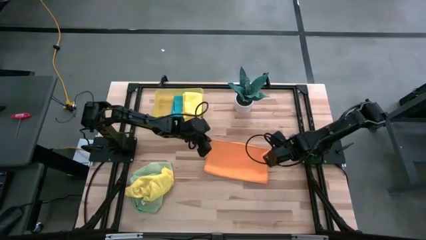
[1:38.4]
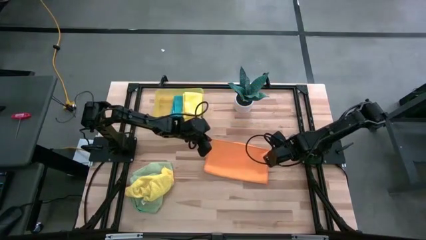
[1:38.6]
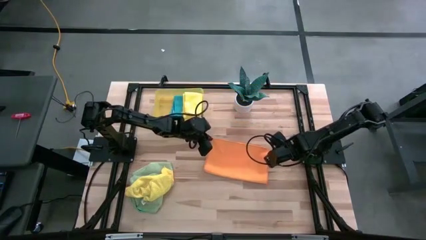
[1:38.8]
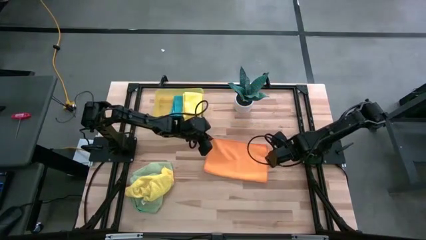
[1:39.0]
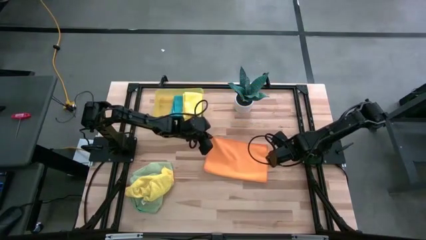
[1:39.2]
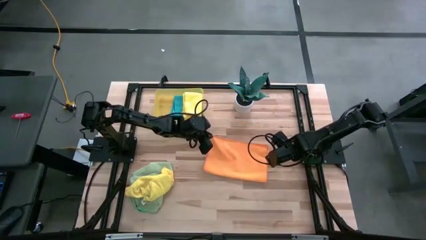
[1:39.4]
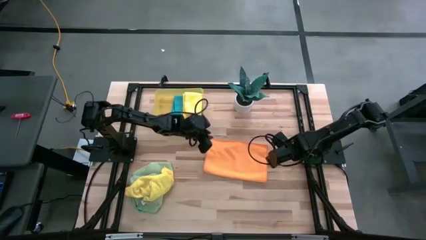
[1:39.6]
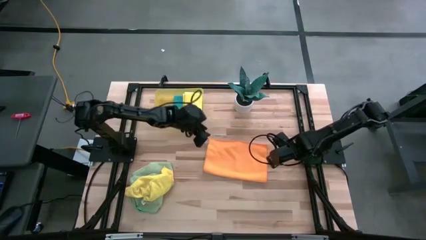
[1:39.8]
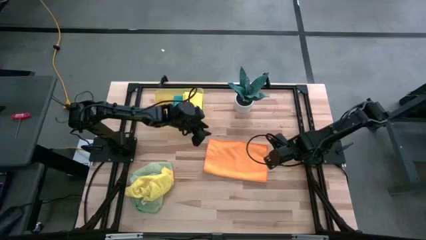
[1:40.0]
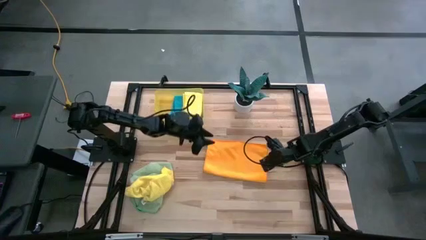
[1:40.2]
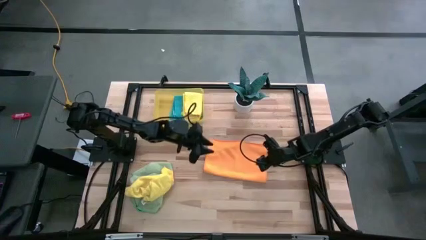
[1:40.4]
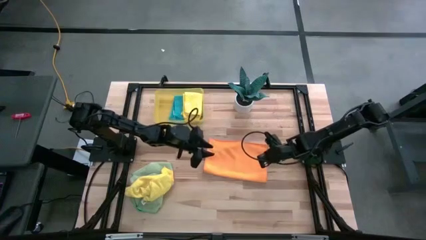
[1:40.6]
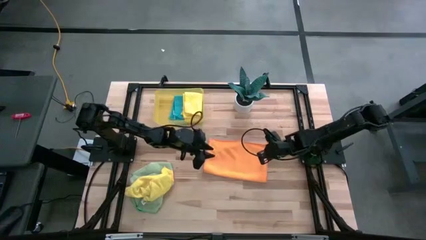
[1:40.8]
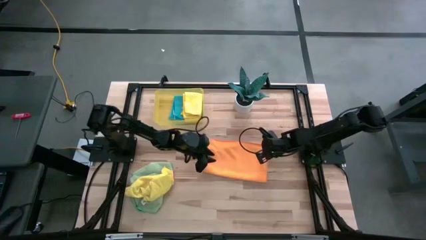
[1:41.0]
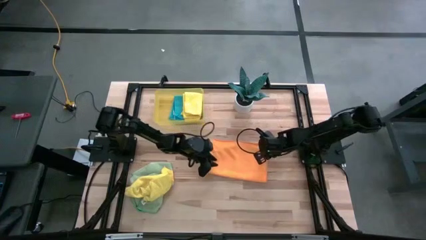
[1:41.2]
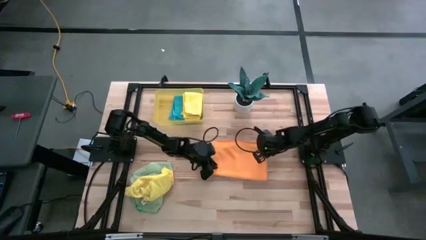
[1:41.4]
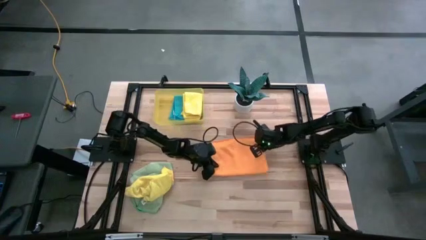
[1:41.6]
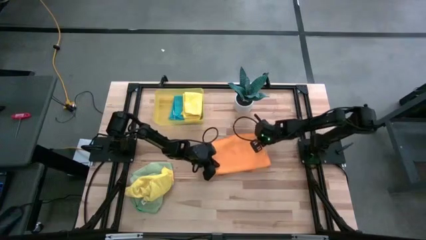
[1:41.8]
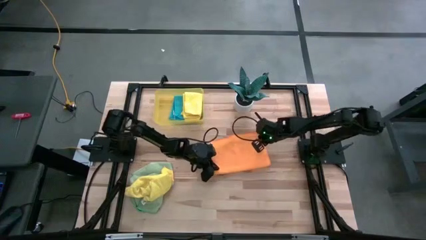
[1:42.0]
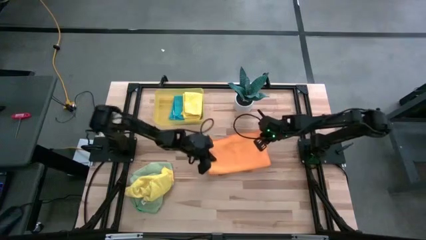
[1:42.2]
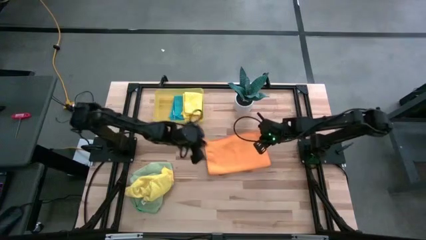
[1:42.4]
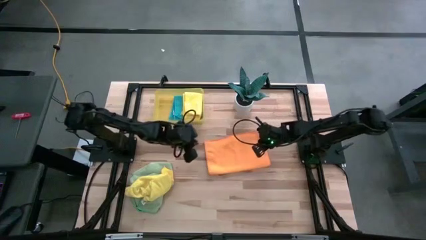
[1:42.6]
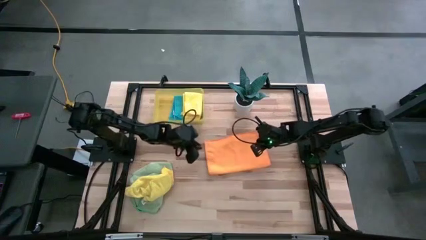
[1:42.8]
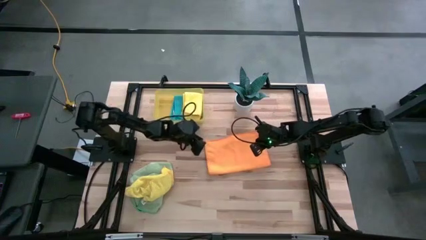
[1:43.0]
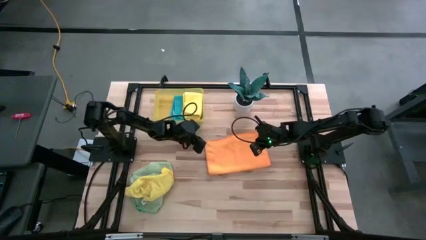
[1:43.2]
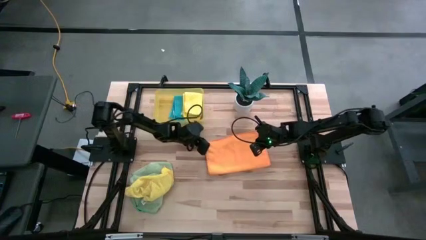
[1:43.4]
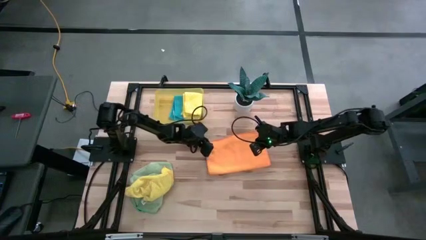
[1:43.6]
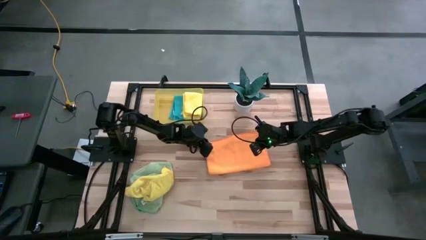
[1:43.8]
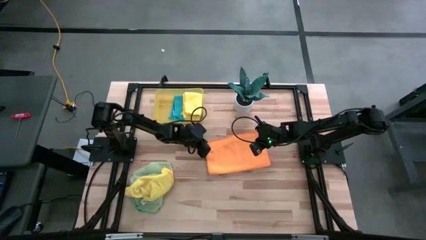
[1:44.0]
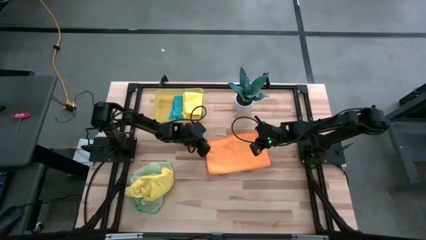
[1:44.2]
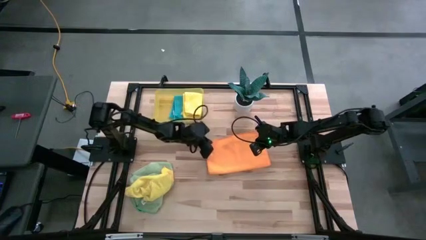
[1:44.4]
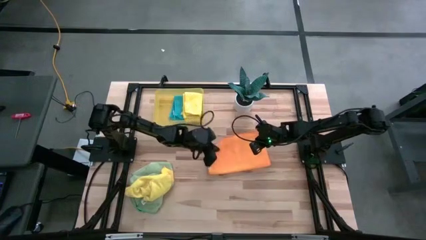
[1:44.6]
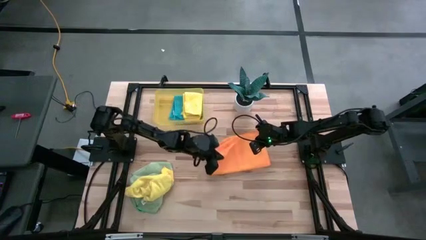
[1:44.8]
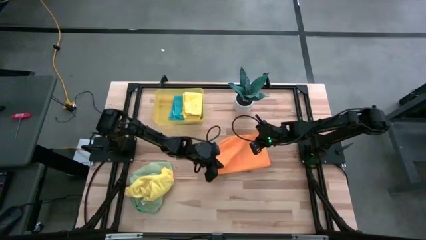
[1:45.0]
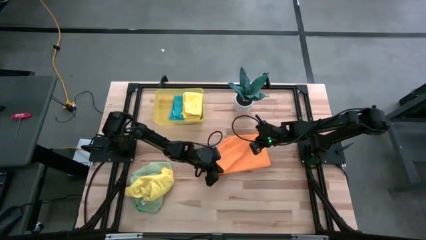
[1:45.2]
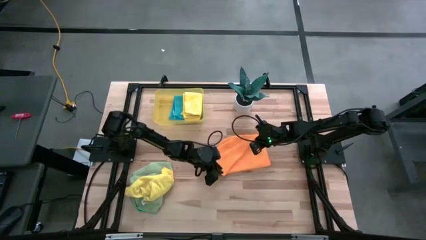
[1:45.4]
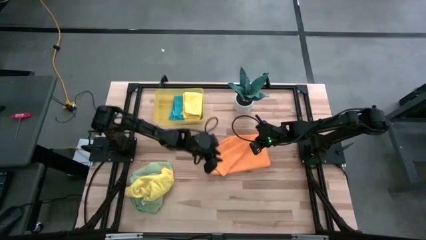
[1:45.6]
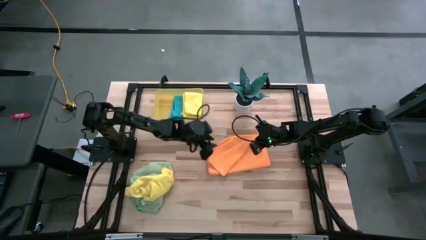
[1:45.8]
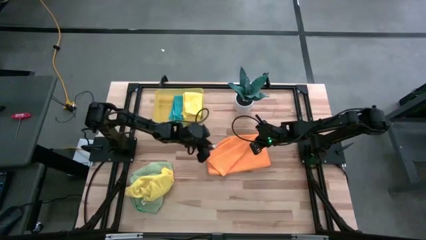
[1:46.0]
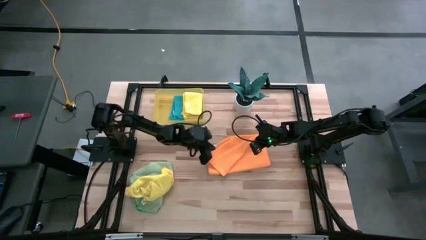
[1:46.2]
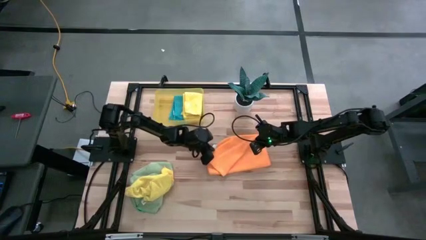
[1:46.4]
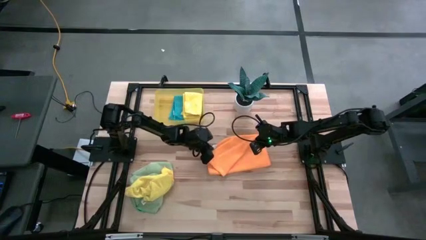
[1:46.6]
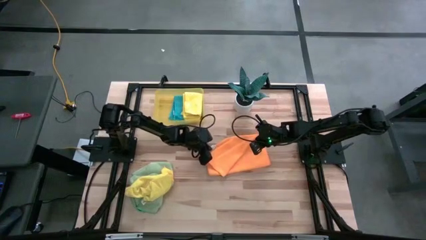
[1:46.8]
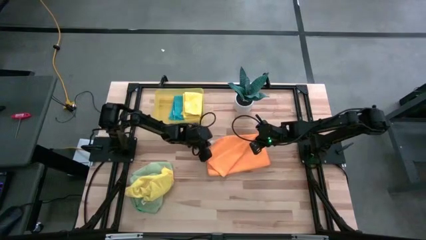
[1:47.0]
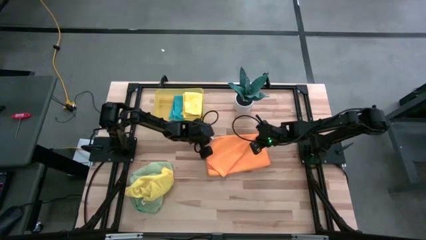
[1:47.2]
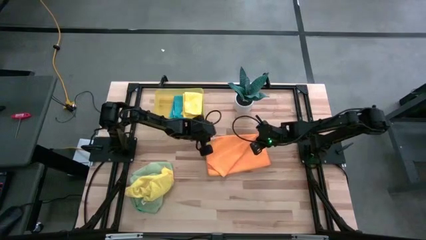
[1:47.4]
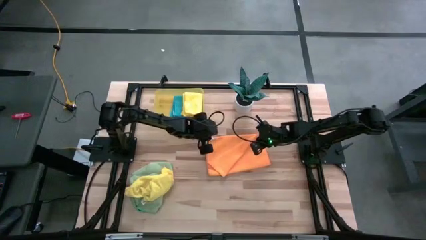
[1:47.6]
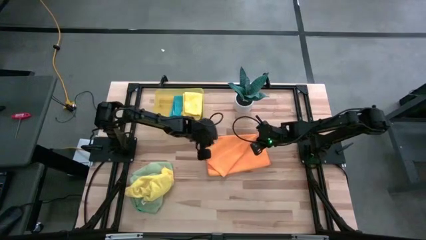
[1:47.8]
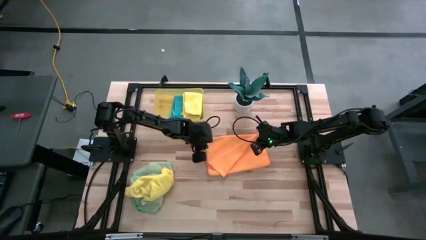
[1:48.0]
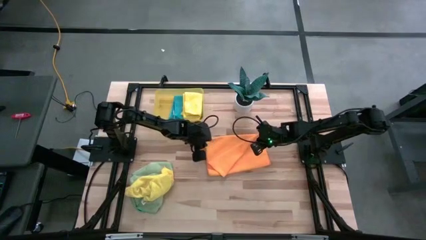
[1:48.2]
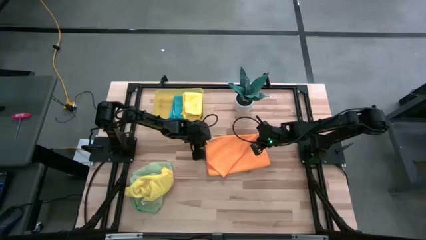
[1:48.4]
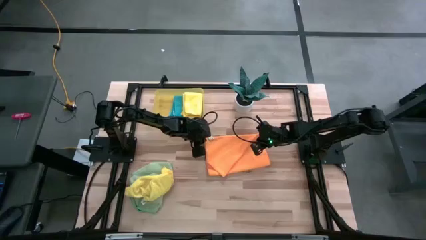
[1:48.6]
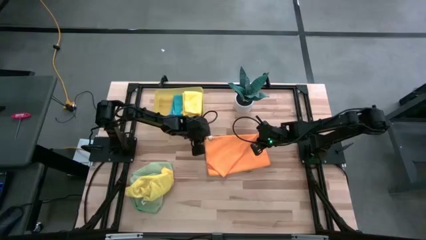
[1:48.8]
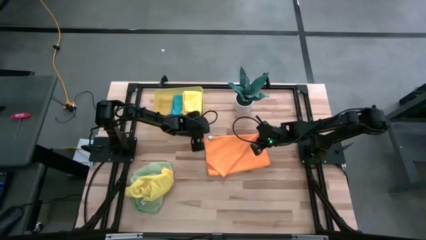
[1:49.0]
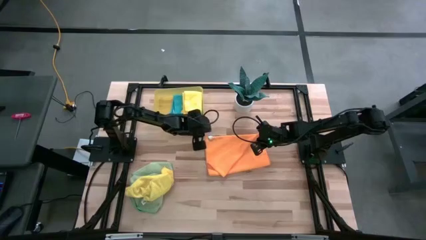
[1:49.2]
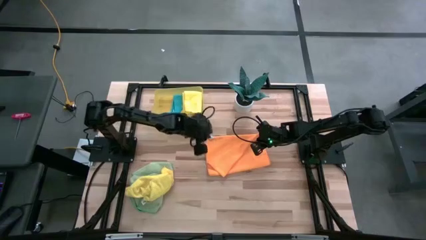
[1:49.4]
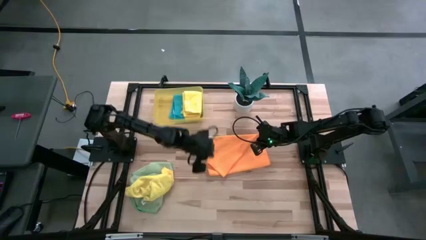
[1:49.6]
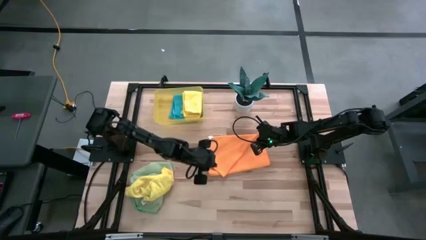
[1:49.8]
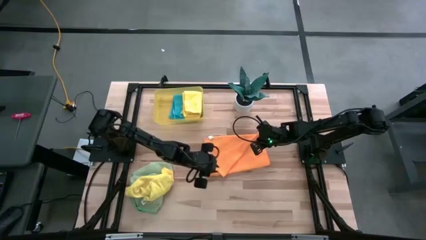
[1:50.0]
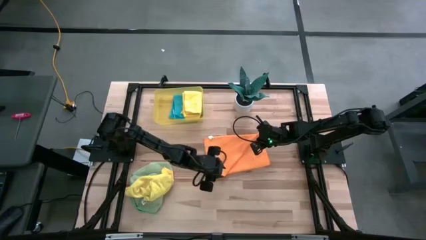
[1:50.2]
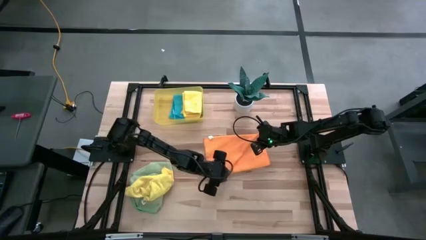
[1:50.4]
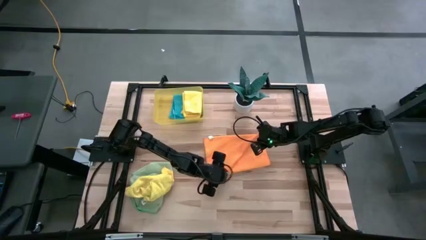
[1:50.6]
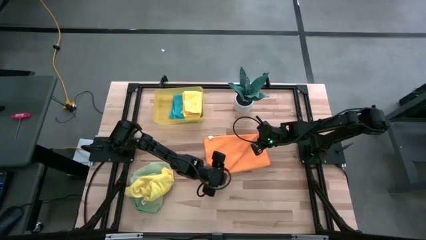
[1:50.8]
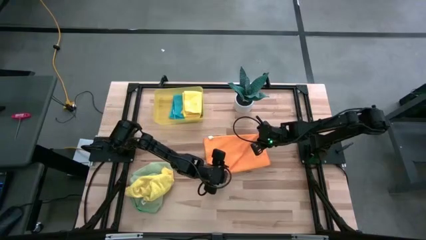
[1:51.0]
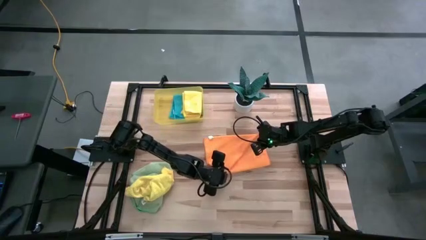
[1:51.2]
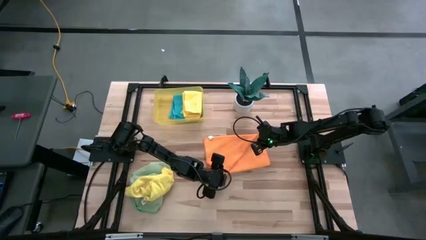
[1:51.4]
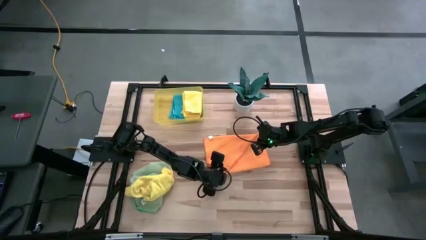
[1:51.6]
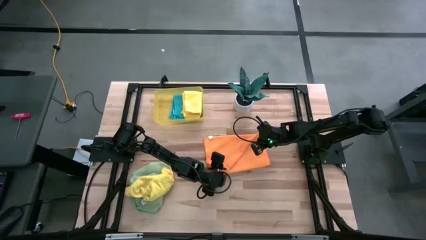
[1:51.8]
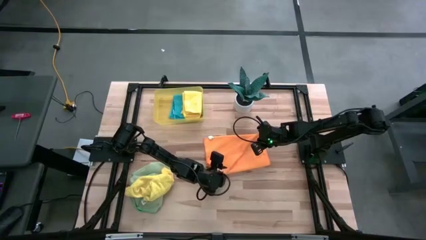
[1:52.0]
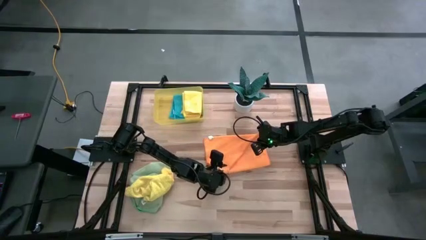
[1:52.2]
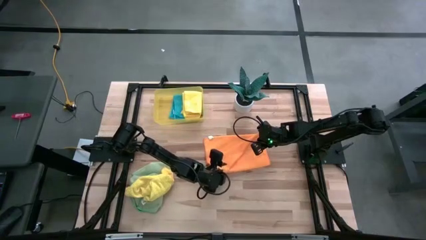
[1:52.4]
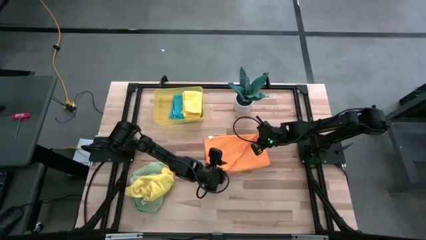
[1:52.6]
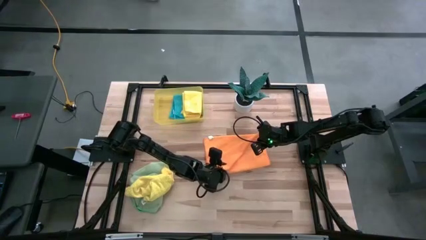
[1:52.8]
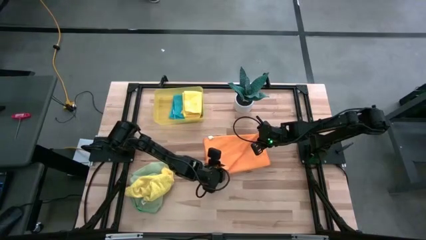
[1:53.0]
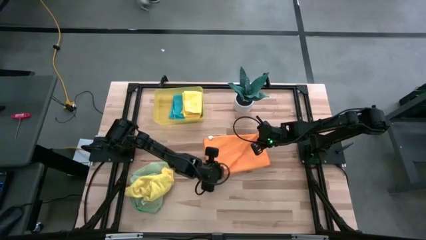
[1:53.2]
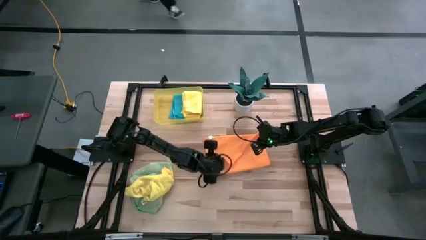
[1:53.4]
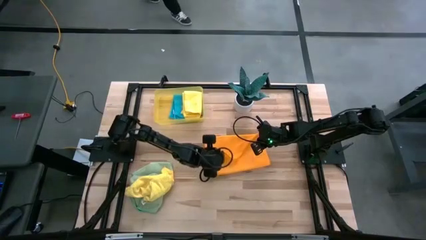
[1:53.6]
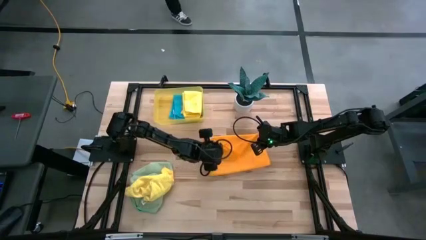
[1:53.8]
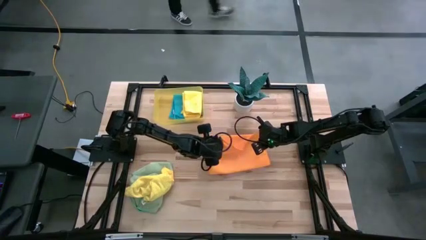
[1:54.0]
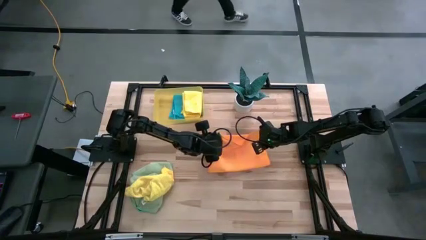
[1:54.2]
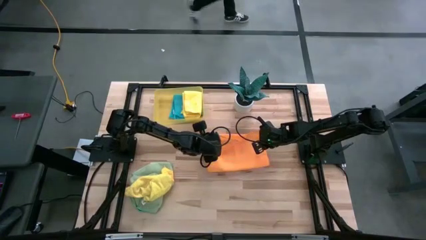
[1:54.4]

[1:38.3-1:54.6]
Task: Fold microfiber towels
Fold the orange microfiber cloth
